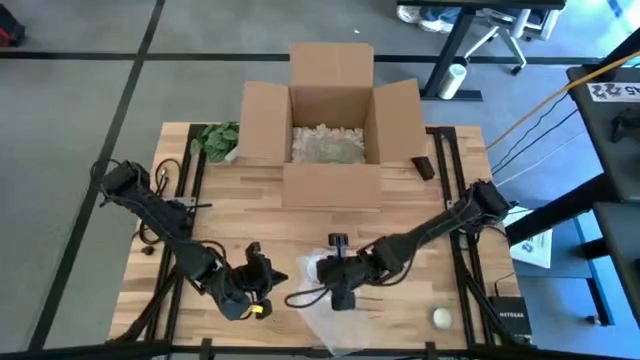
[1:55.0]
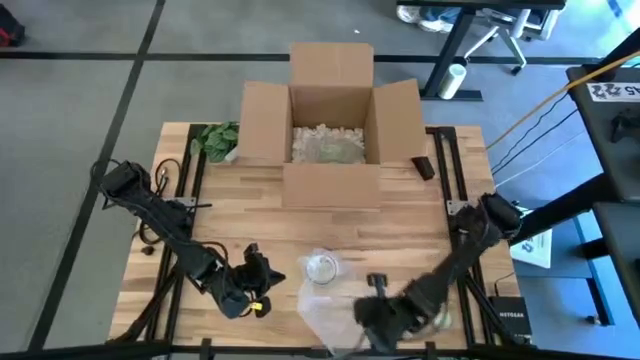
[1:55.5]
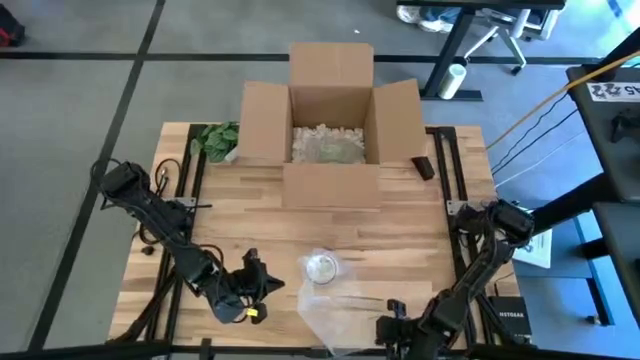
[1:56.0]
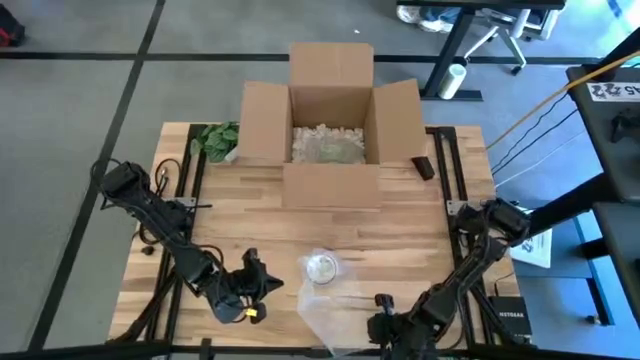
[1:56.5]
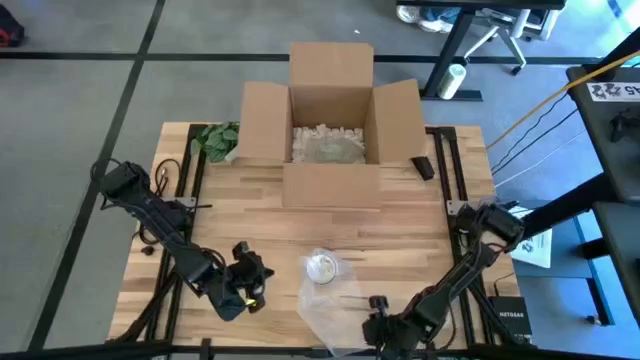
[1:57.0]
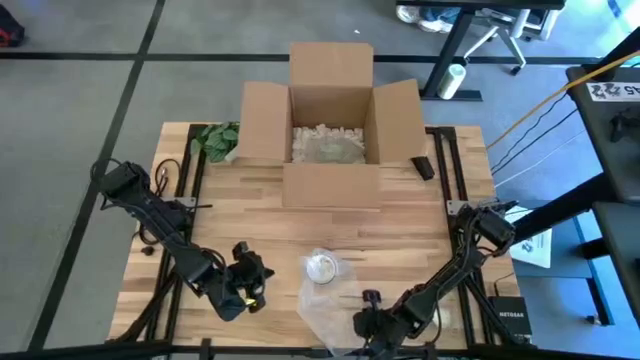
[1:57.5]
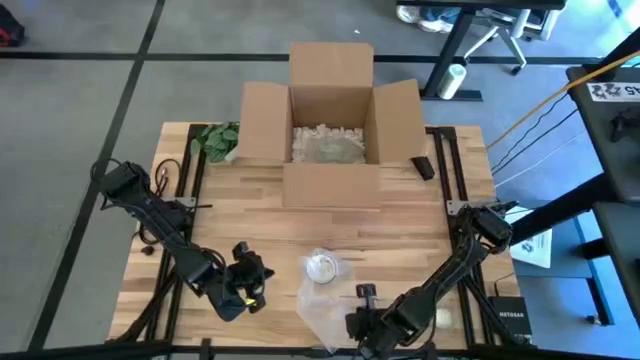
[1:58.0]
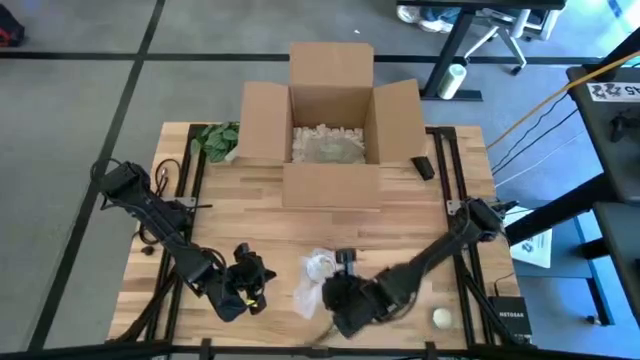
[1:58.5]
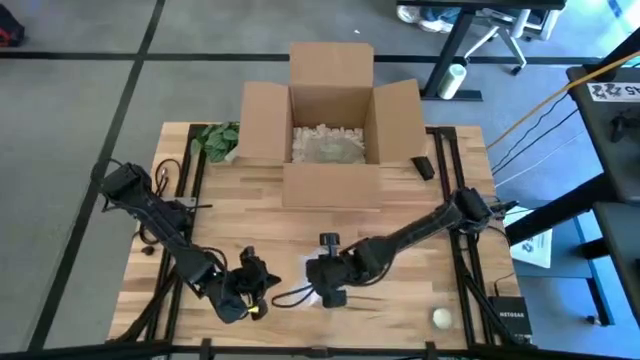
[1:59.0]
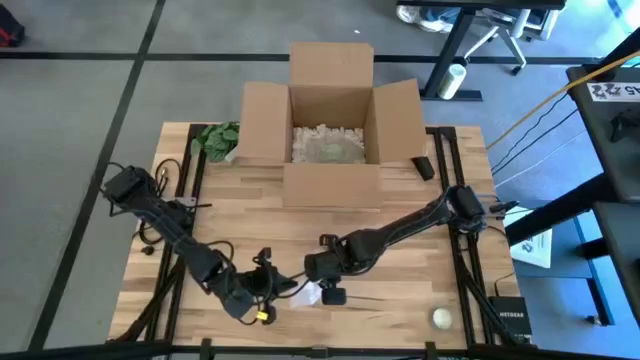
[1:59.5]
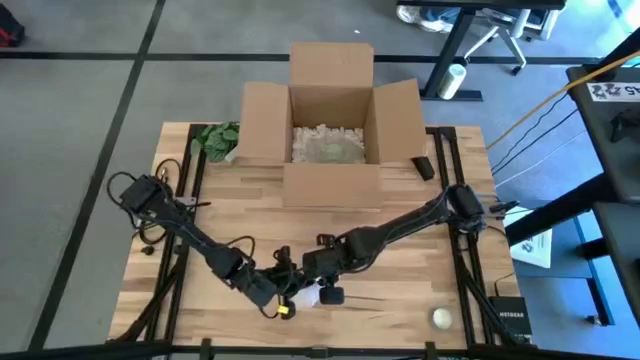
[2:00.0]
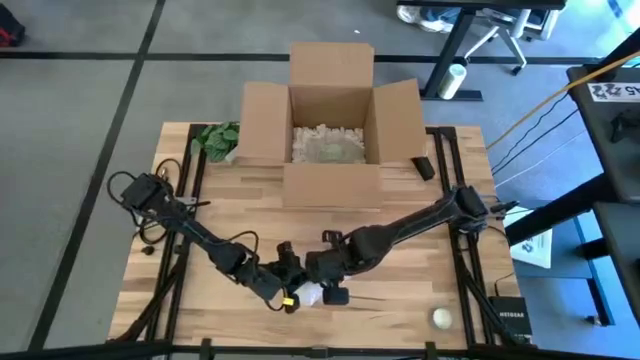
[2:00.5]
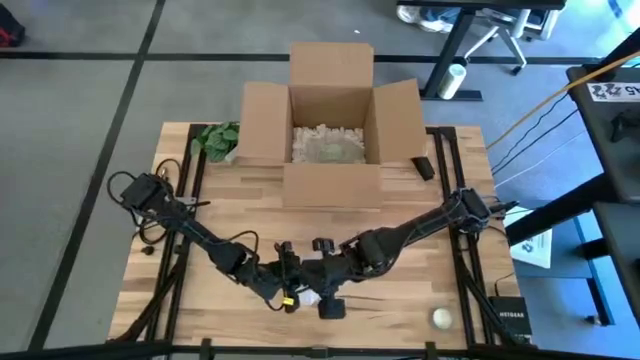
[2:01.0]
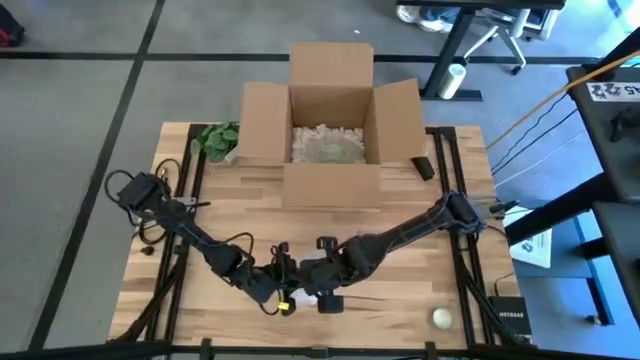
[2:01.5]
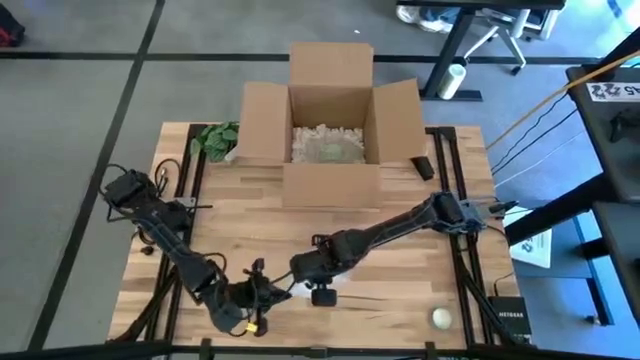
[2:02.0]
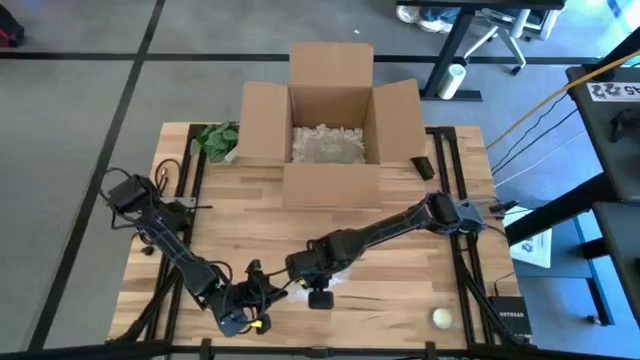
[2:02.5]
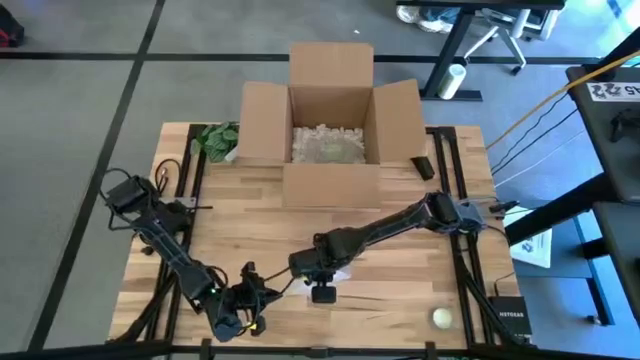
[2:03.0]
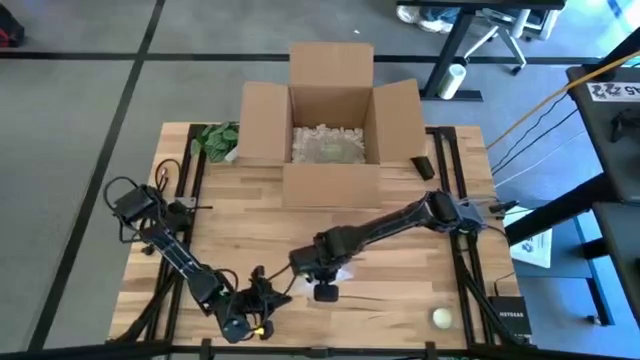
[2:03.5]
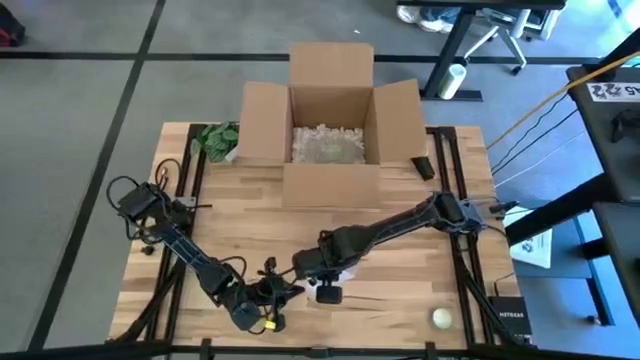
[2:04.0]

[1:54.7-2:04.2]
Task: wrap mug
Wrap the white and blue mug with the bubble wrap

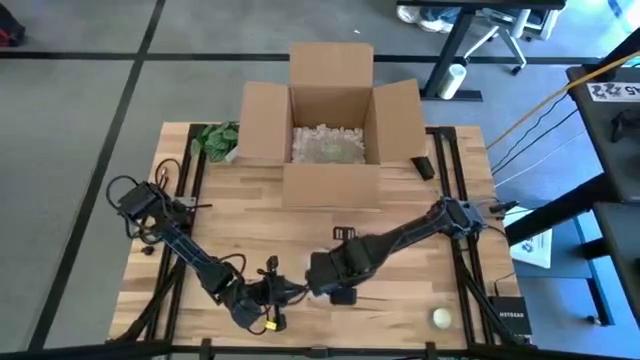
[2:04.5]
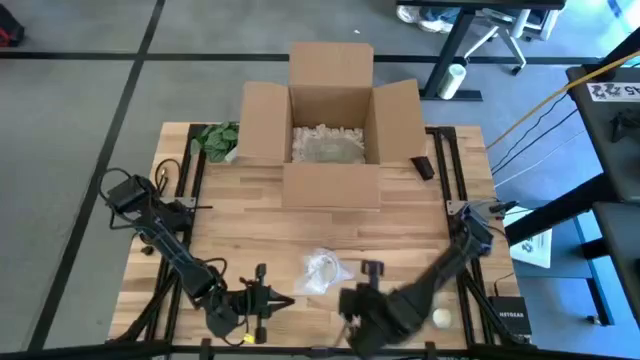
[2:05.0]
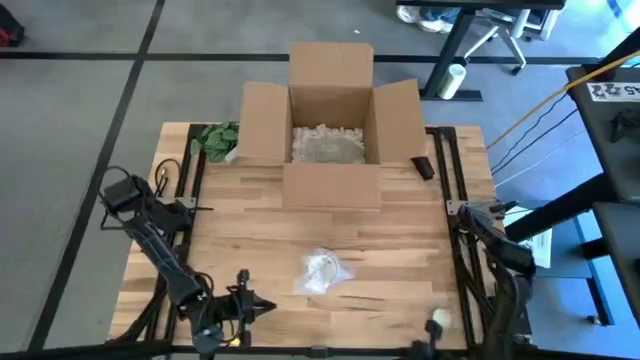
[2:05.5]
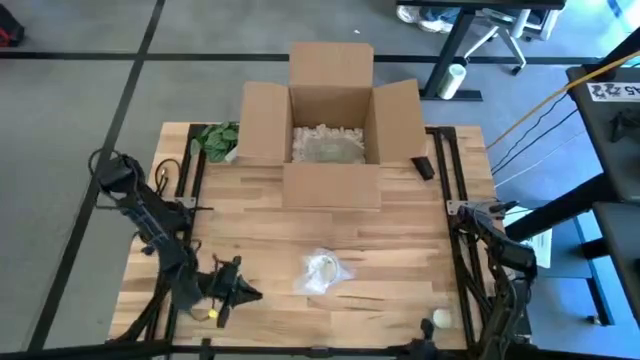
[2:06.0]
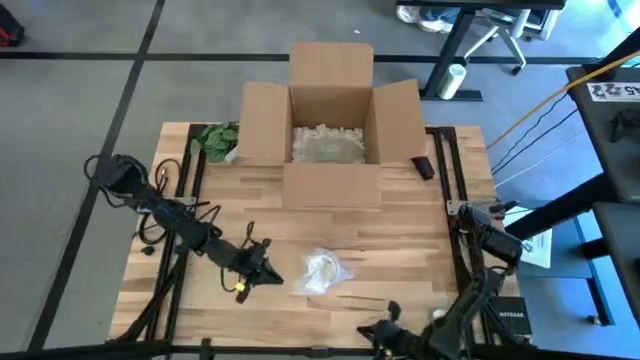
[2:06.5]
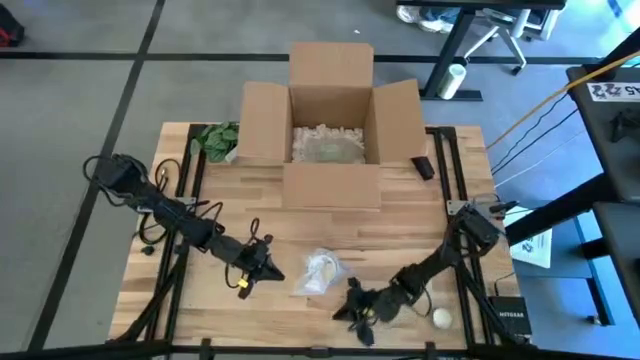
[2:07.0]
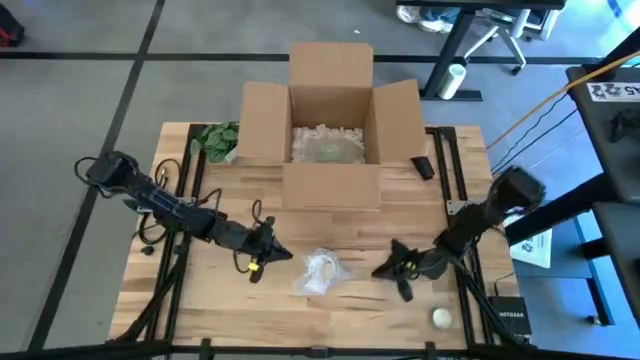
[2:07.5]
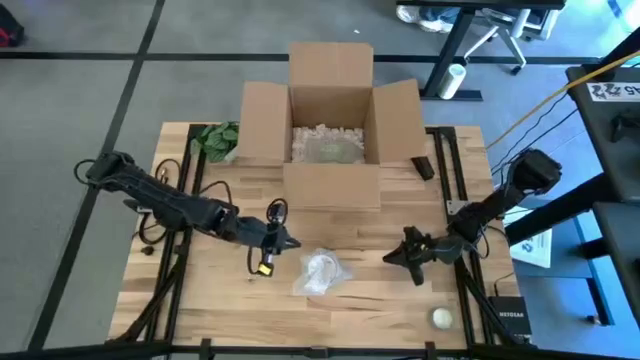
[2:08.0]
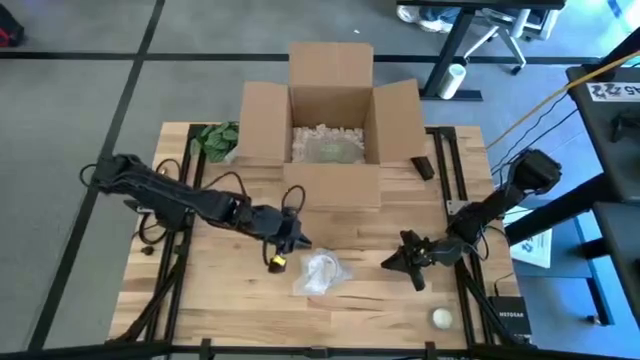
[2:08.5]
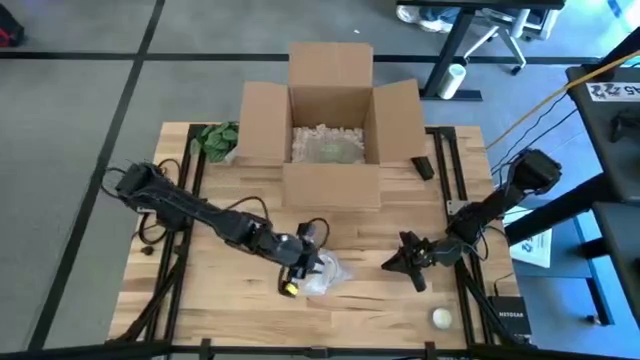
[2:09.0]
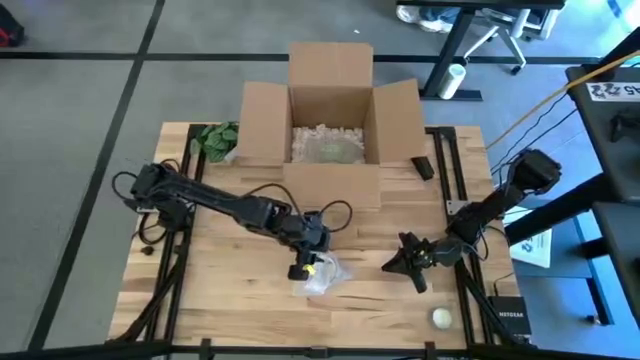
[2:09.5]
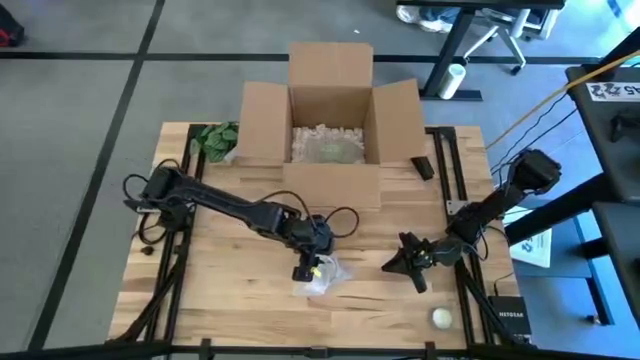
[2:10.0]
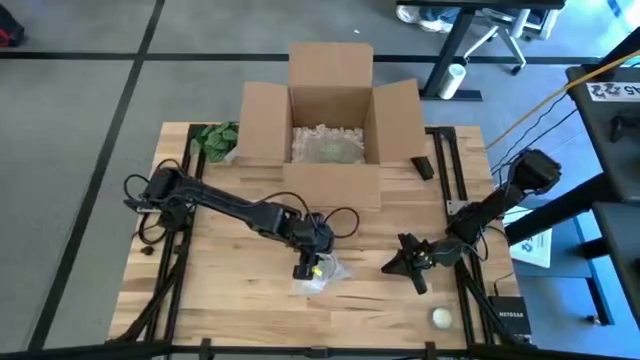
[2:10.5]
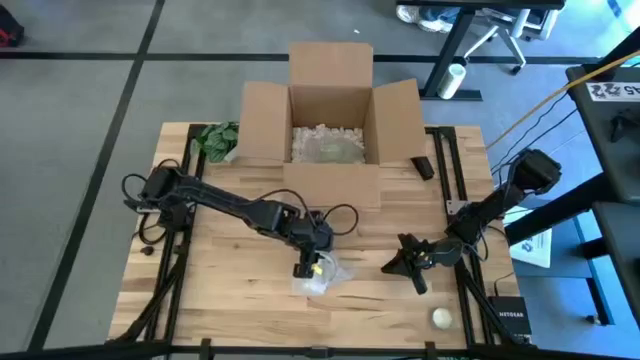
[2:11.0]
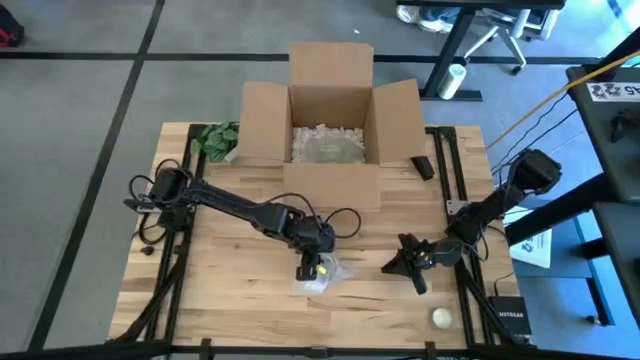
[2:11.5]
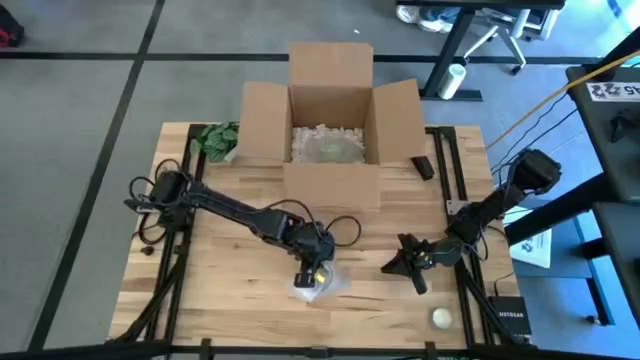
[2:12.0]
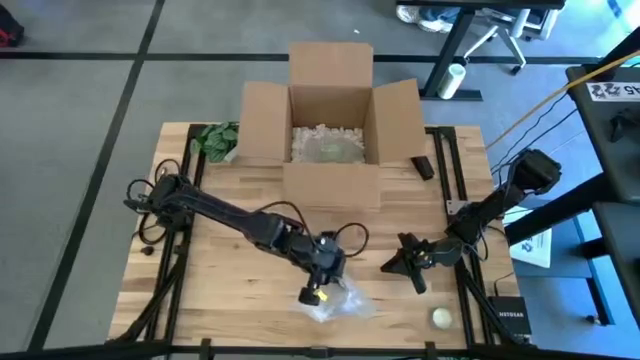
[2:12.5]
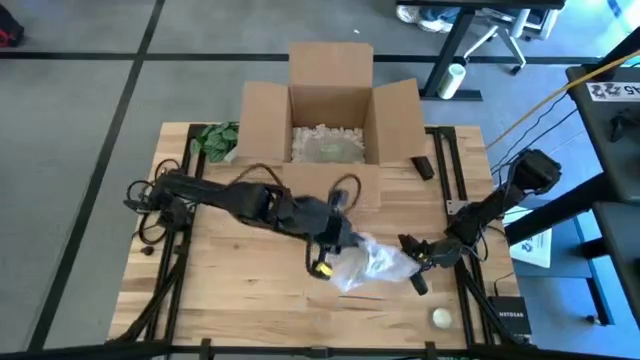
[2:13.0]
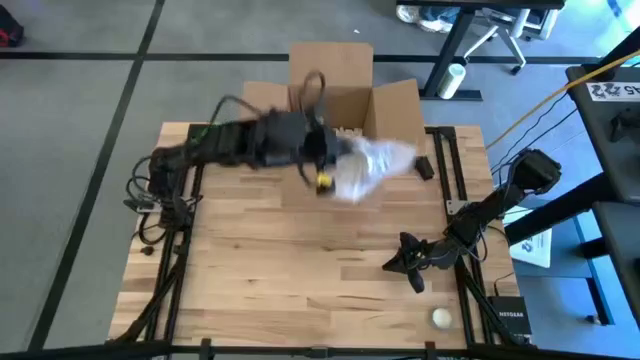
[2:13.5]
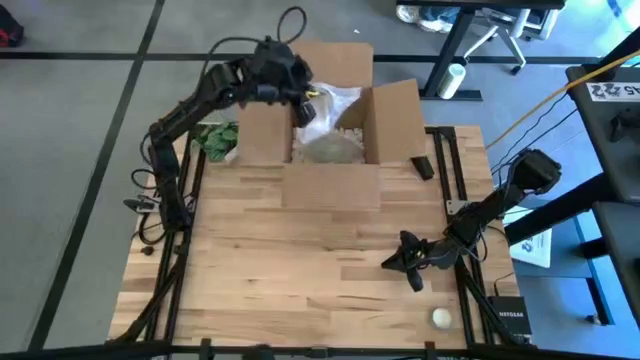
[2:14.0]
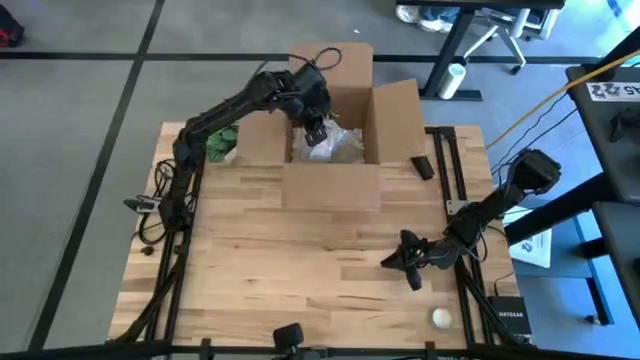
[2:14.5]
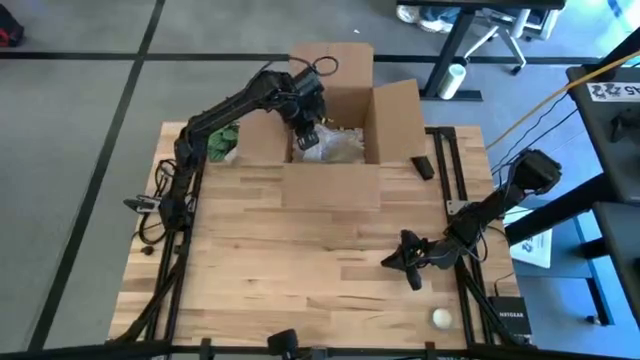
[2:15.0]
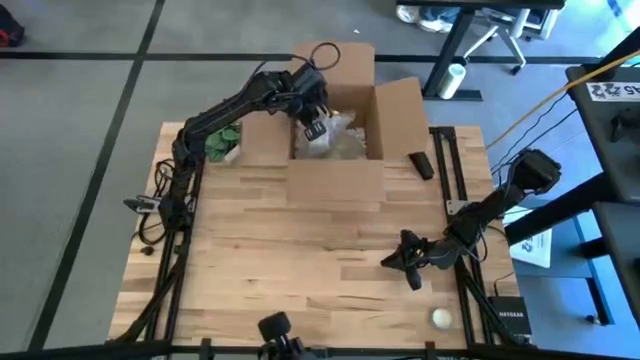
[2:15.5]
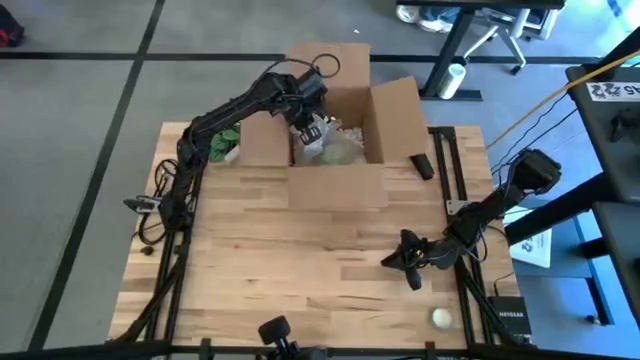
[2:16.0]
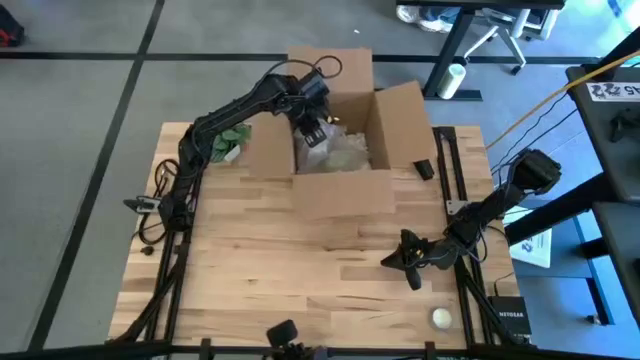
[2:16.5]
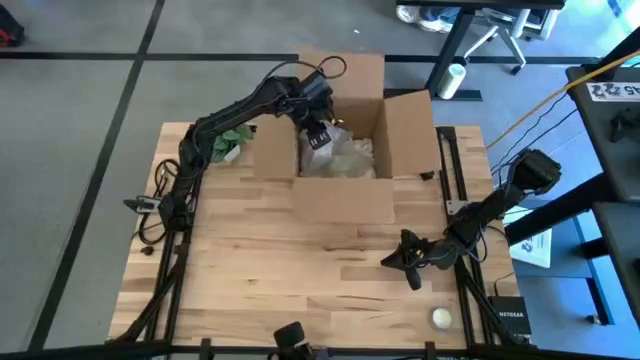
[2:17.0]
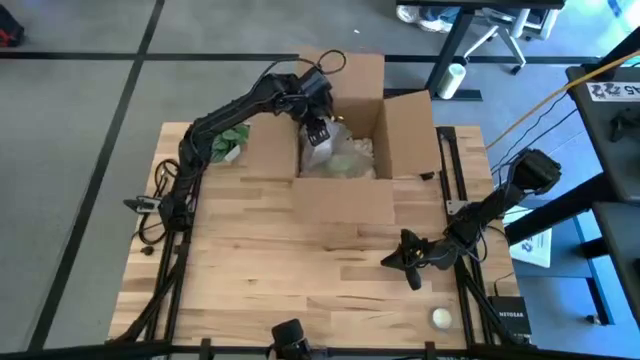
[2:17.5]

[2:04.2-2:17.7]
Put the wrapped white and blue mug into the cardboard box
